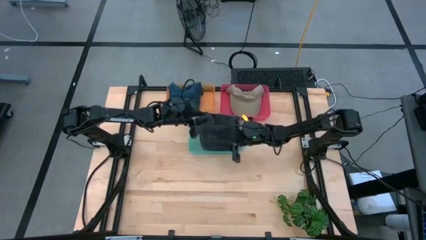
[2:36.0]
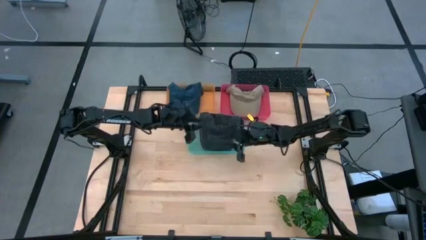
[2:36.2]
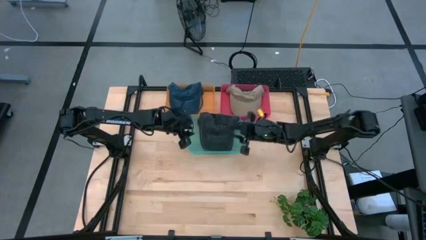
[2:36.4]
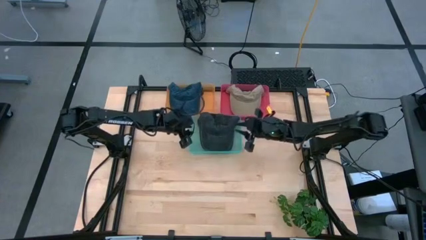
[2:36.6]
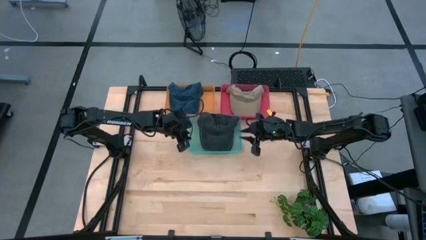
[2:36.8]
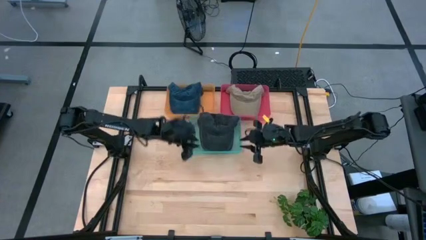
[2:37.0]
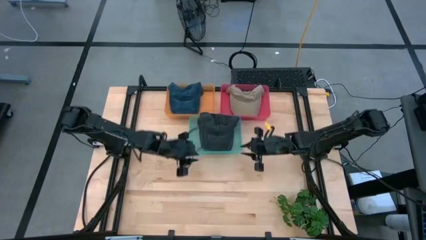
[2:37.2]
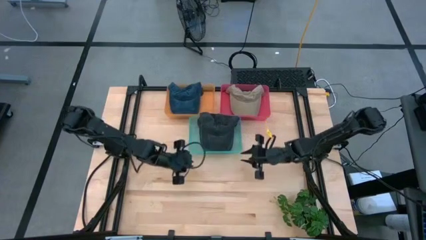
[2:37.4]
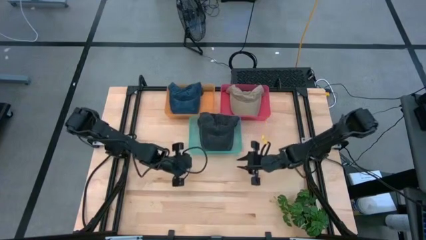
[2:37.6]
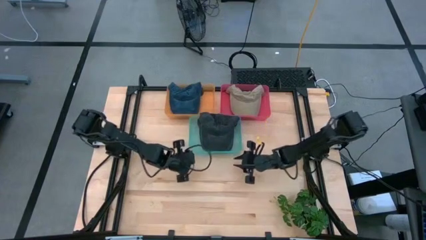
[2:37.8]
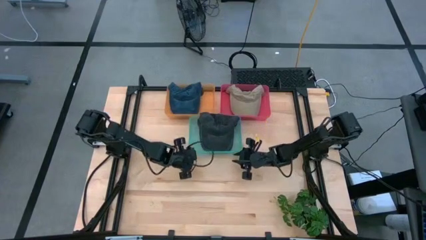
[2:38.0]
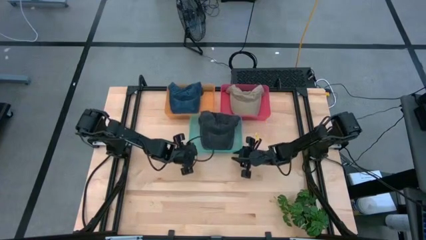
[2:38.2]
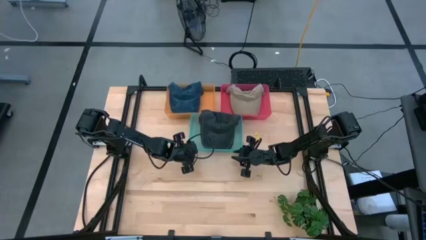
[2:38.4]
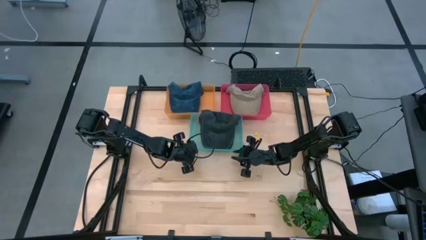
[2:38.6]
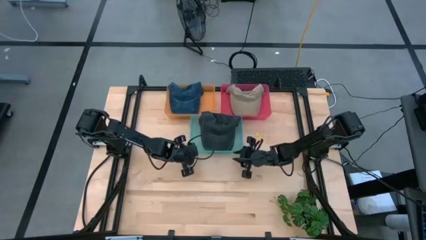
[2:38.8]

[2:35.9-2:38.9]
Task: Pick & Place hat
Adjust the blue bin

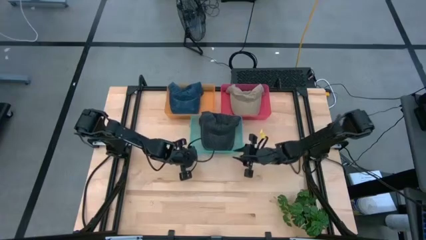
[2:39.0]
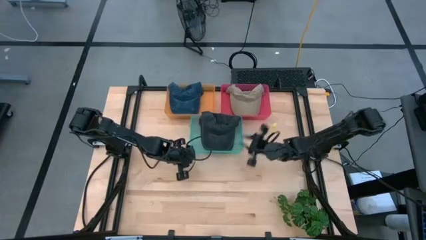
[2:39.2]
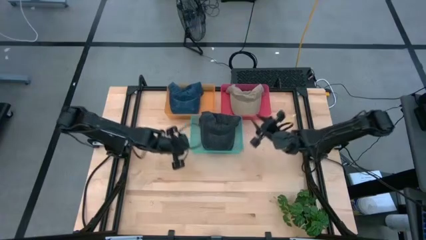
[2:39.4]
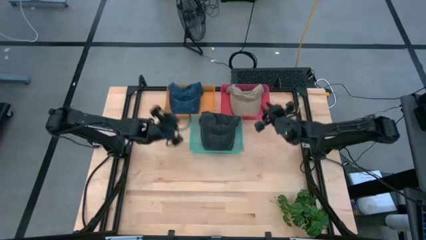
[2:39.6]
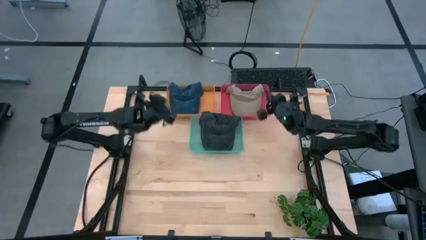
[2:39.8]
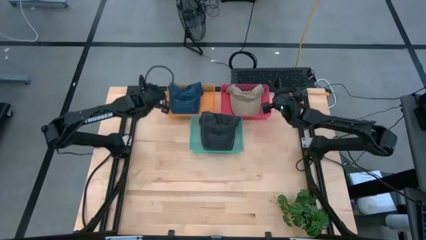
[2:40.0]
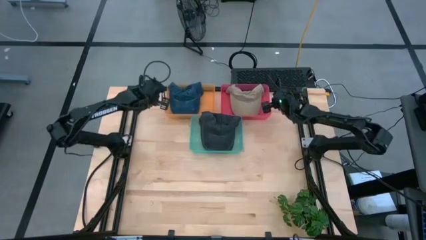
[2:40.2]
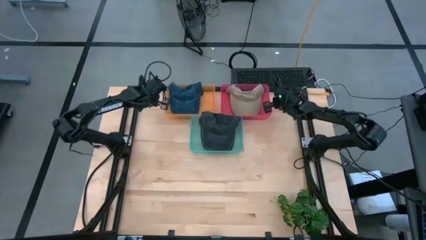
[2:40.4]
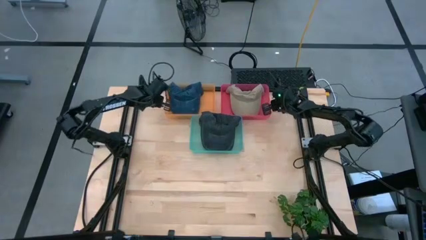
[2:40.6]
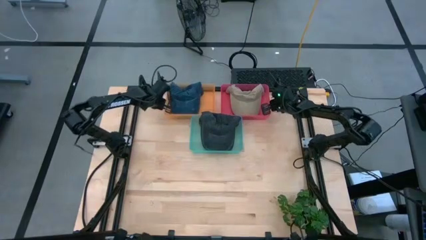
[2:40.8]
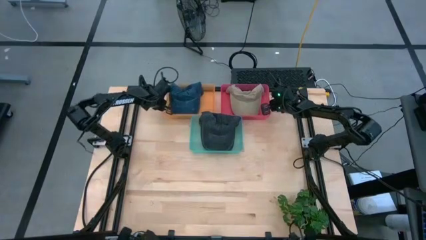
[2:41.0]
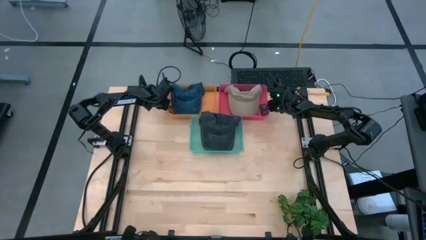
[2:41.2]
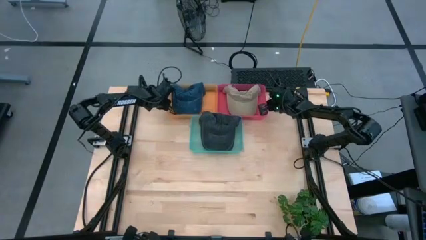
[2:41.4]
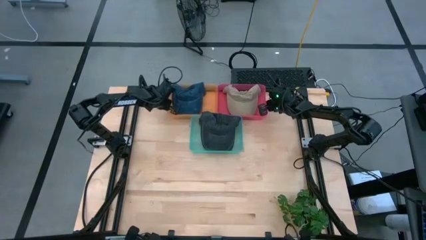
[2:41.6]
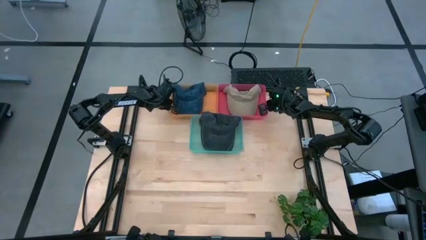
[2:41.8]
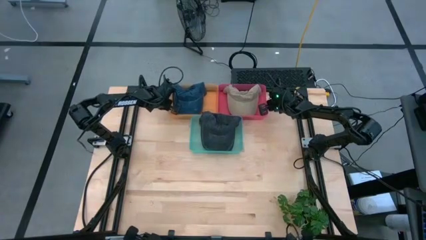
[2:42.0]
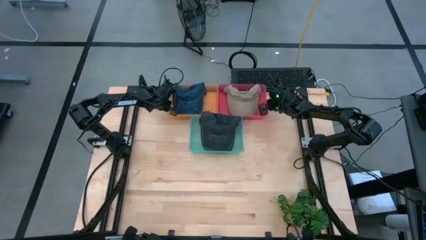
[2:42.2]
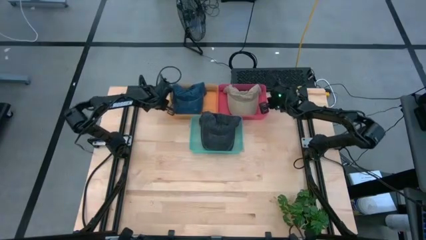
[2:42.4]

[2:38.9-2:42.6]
Adjust the orange and red bin

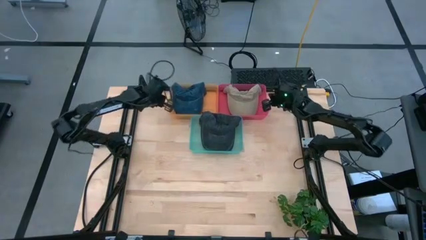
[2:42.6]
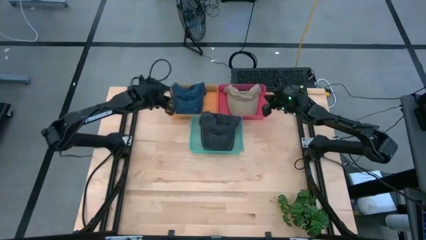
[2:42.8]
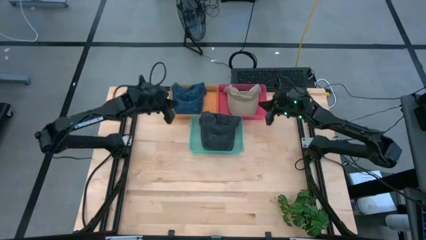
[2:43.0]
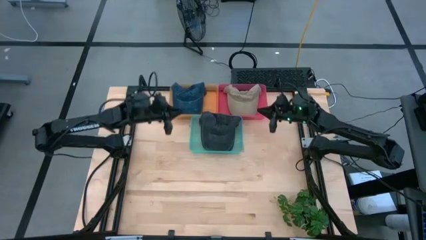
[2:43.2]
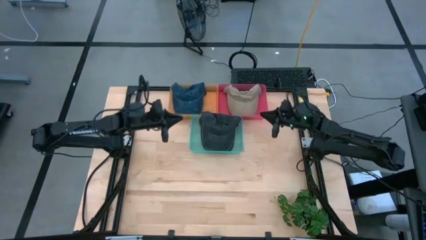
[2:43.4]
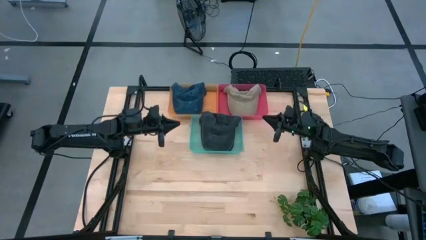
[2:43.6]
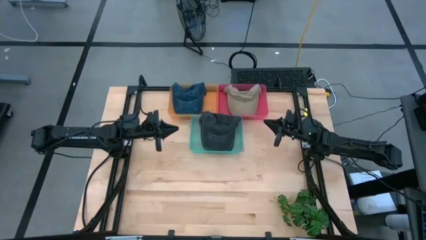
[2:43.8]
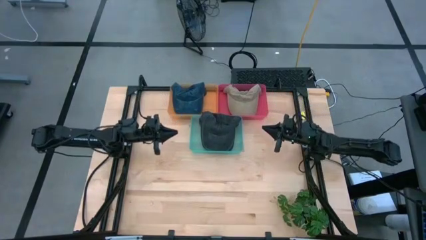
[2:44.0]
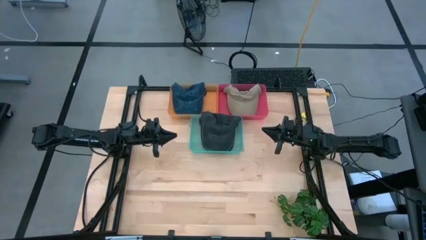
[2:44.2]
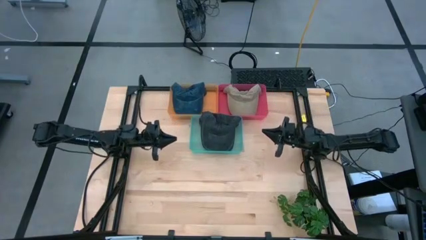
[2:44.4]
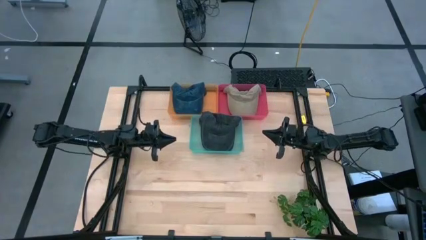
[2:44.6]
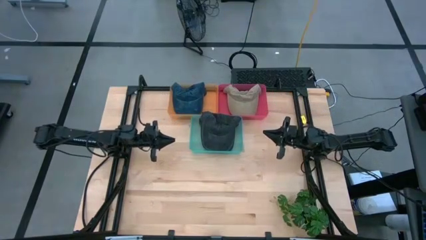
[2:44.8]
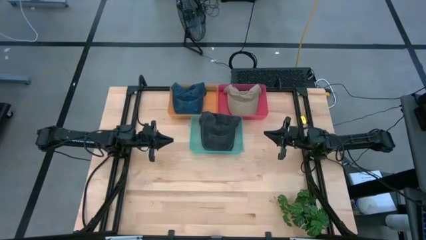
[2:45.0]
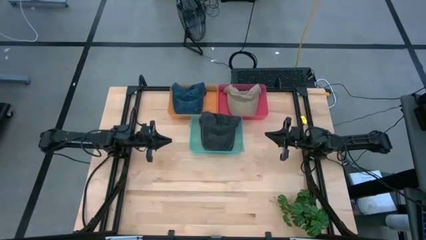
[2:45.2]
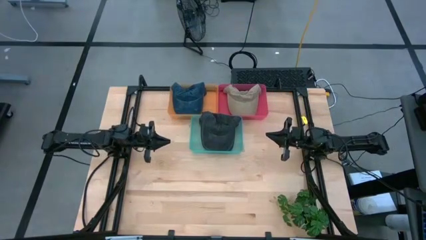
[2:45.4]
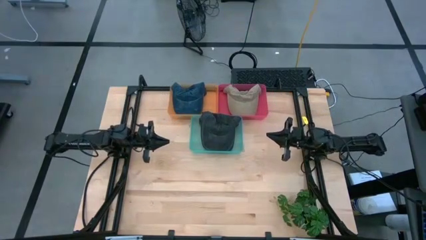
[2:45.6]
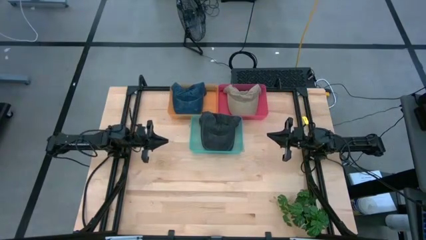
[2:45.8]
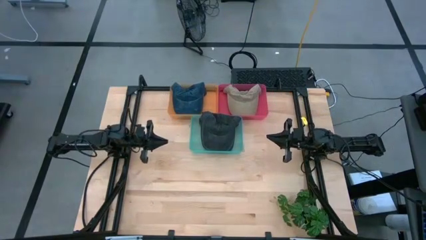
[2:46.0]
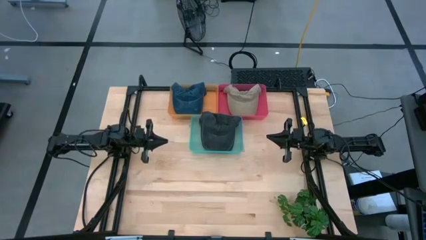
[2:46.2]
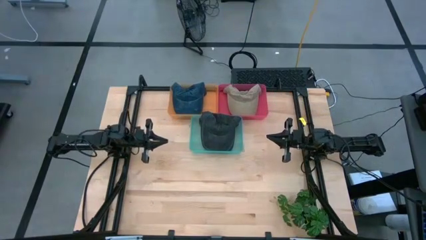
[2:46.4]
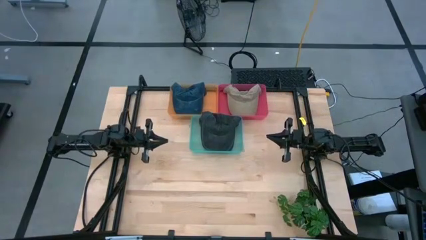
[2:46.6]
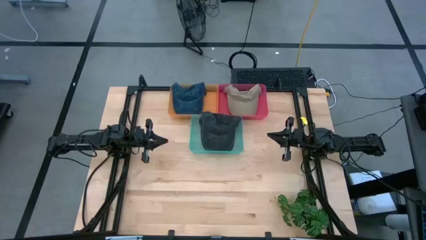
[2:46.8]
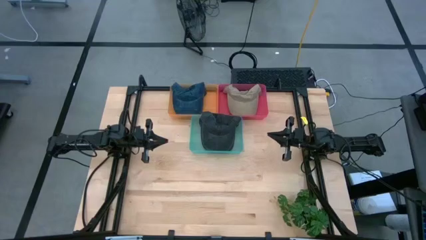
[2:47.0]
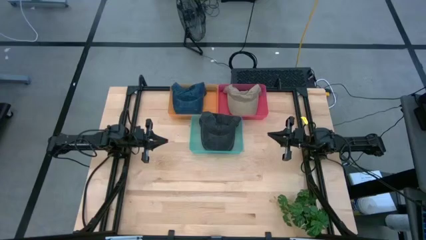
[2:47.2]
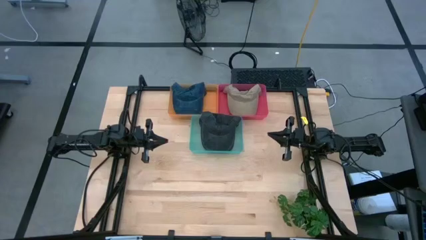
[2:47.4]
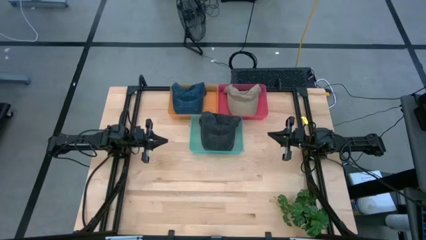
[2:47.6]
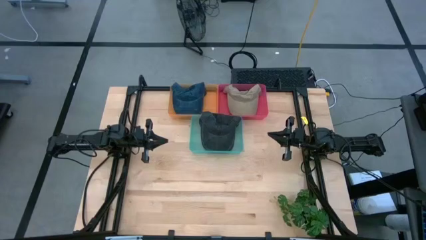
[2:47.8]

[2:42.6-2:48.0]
Return to Home Position

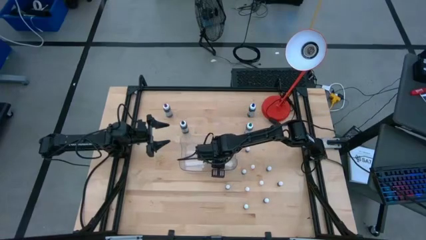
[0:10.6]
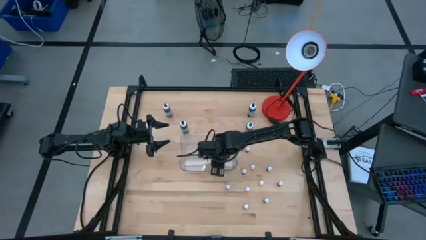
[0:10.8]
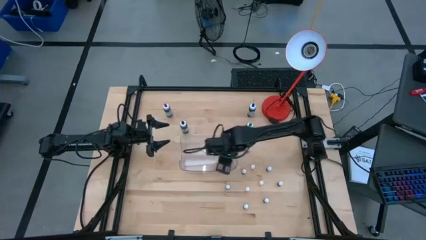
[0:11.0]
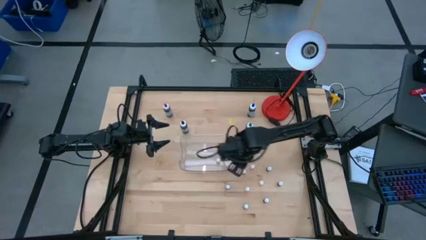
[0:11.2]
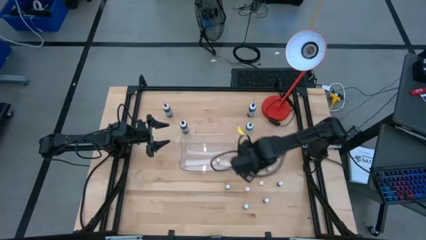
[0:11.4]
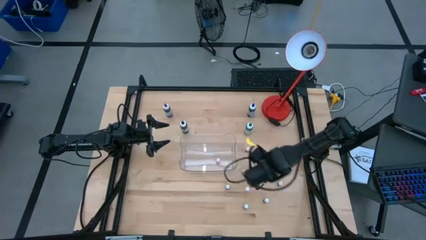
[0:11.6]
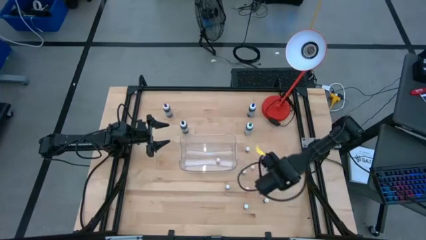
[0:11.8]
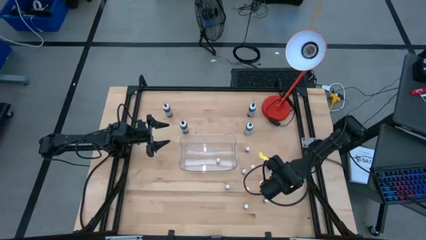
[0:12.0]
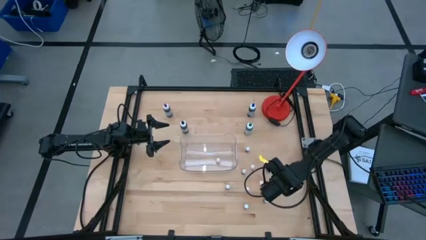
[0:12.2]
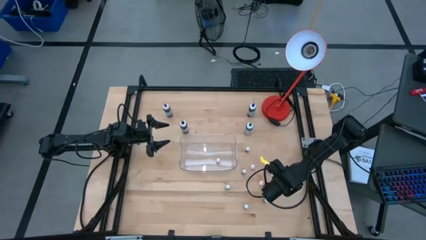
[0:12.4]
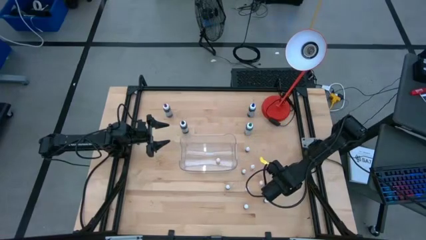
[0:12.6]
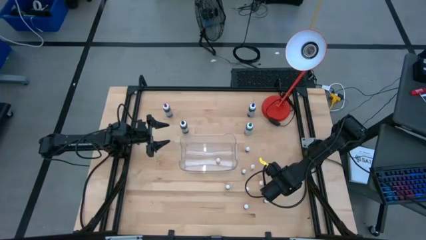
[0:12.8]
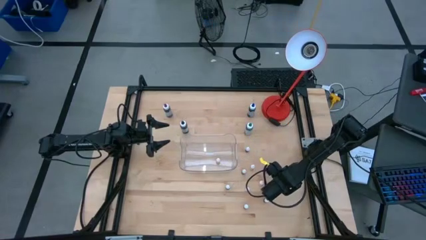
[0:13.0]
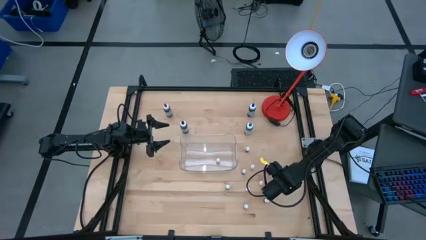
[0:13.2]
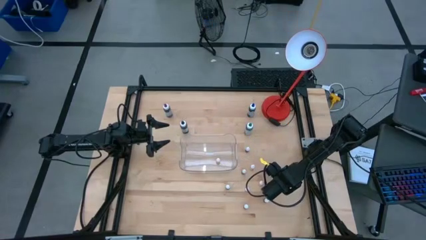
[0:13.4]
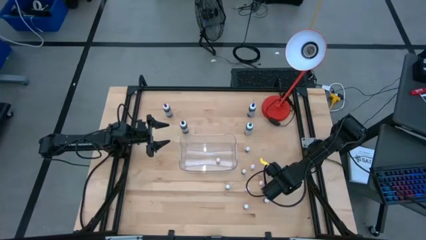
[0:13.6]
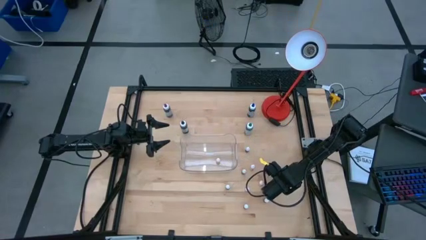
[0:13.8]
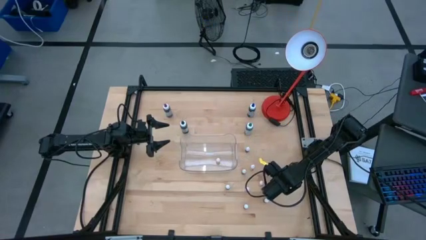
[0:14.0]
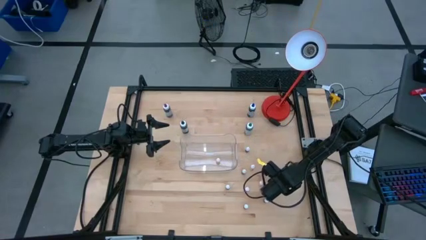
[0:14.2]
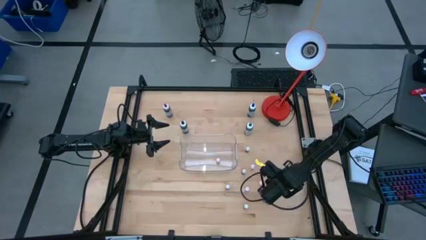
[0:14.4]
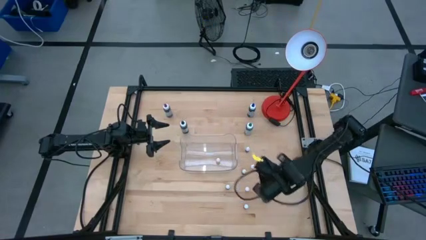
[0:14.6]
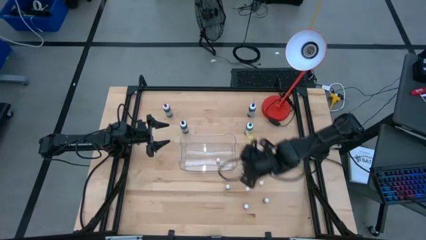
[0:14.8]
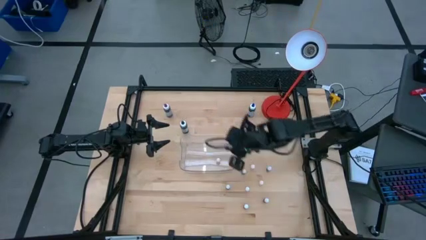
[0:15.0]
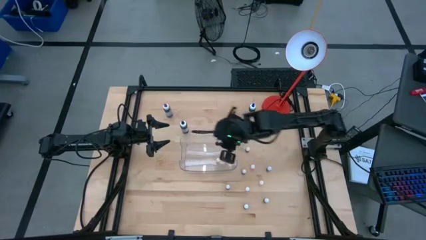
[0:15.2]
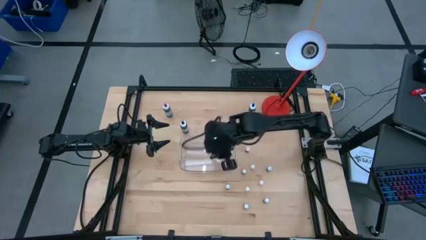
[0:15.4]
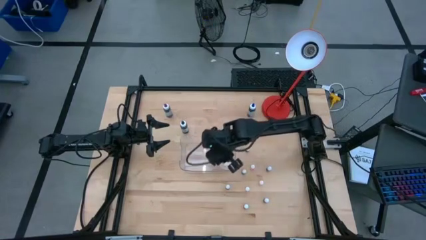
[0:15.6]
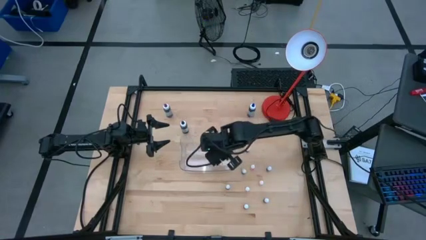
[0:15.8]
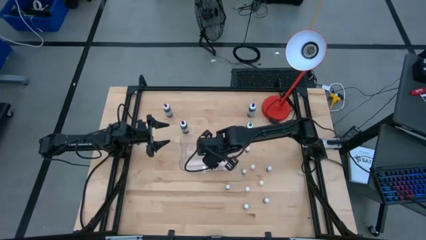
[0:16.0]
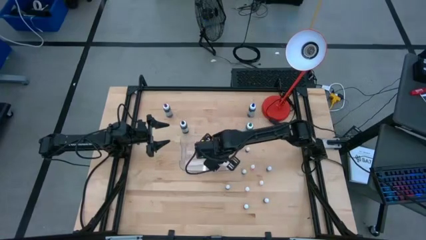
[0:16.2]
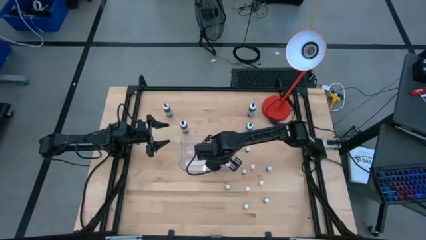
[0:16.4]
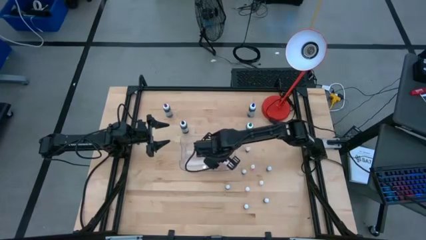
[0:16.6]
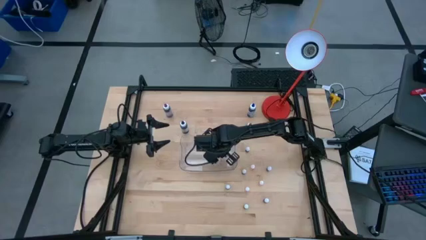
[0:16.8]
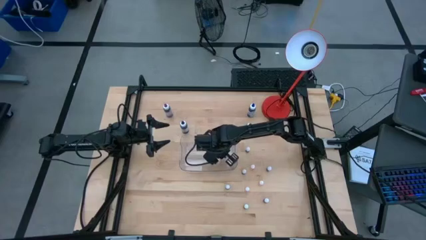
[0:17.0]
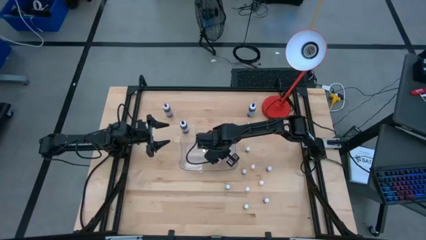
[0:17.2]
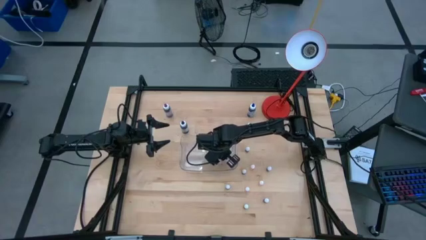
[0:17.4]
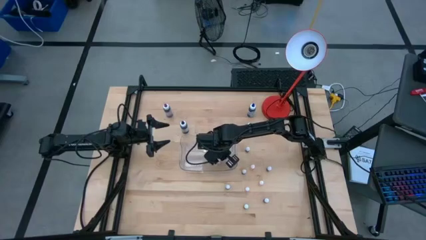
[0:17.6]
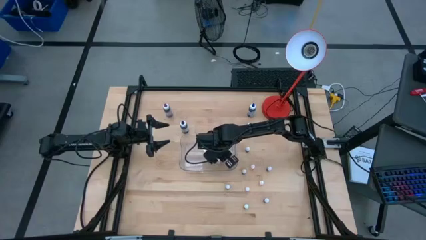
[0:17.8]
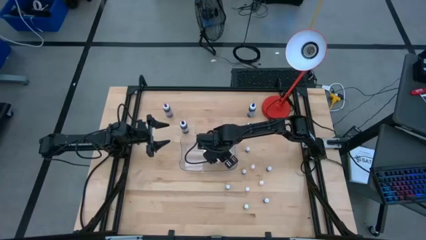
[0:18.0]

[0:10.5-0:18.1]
Task: Pick & Place food coloring
Put the red food coloring bottle into the transparent bin
